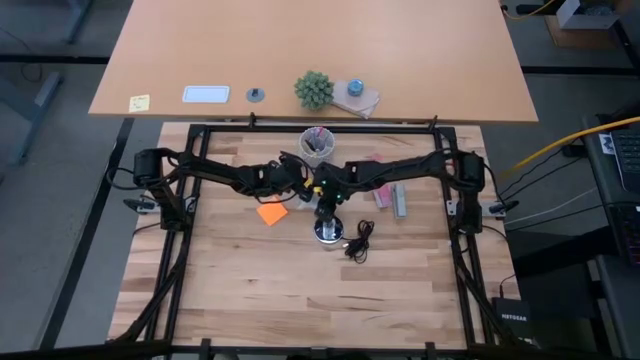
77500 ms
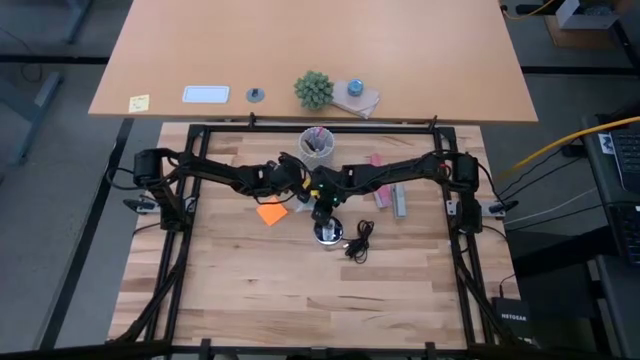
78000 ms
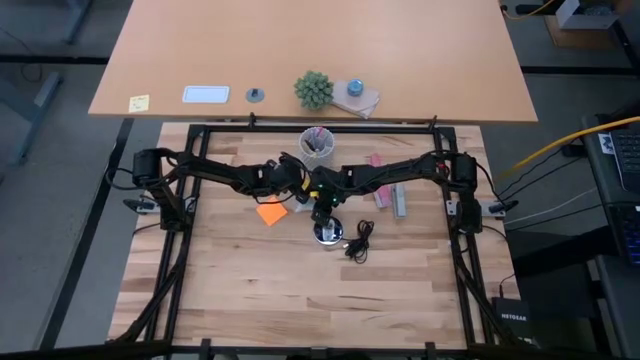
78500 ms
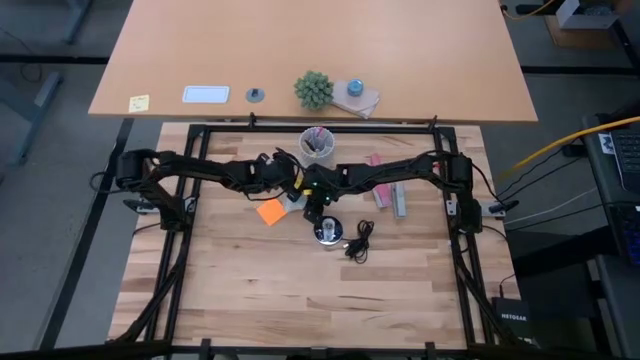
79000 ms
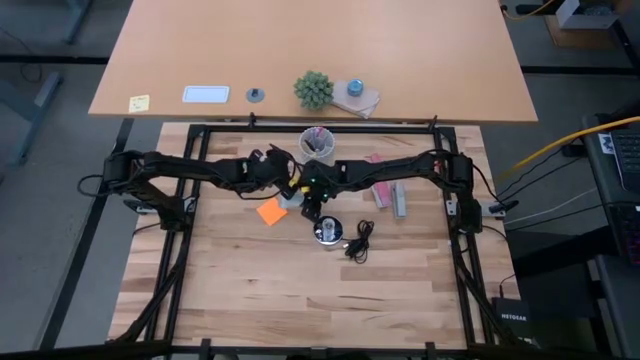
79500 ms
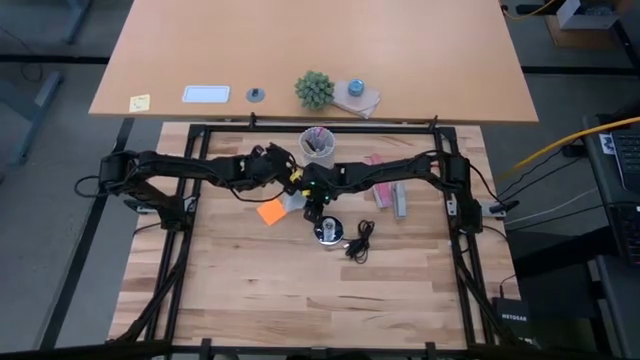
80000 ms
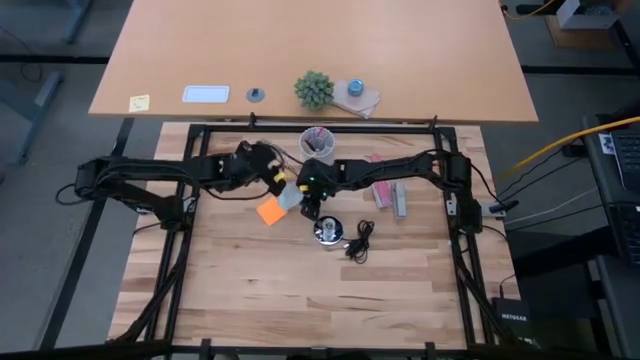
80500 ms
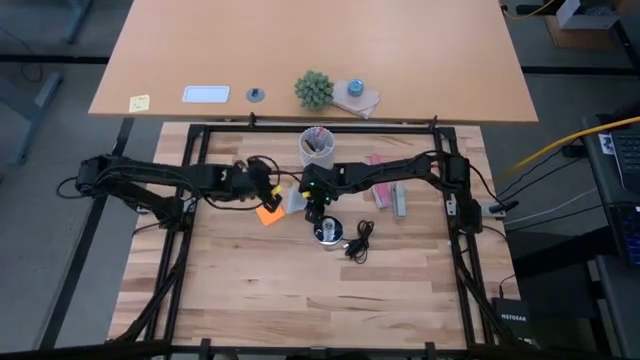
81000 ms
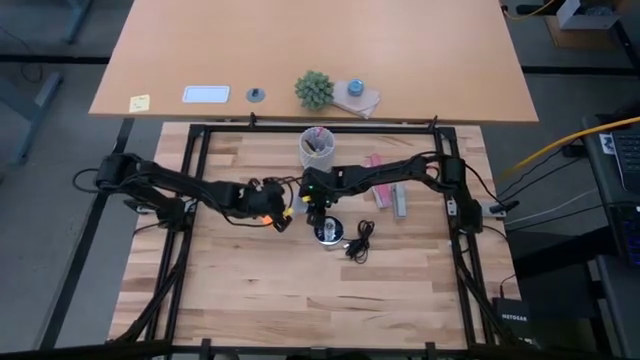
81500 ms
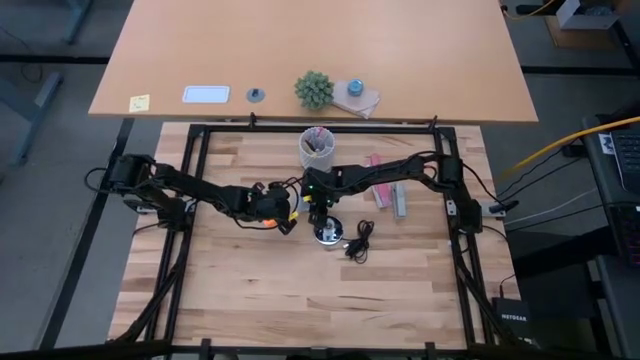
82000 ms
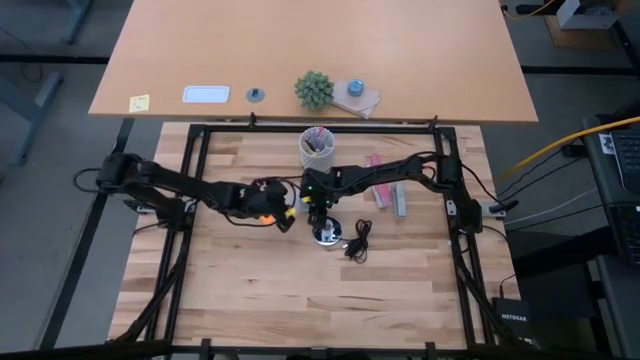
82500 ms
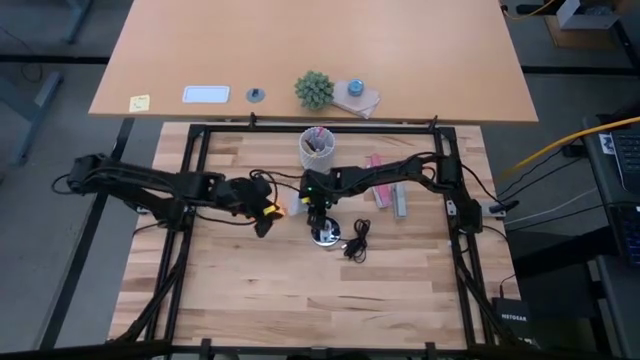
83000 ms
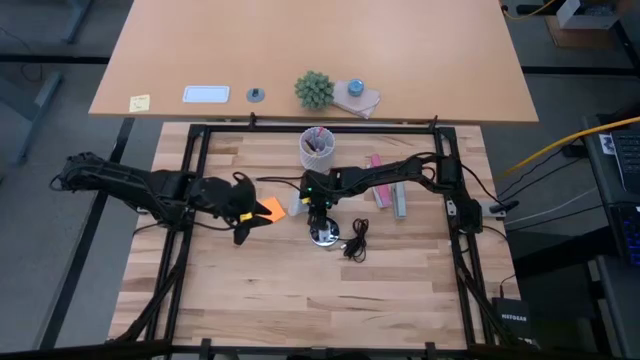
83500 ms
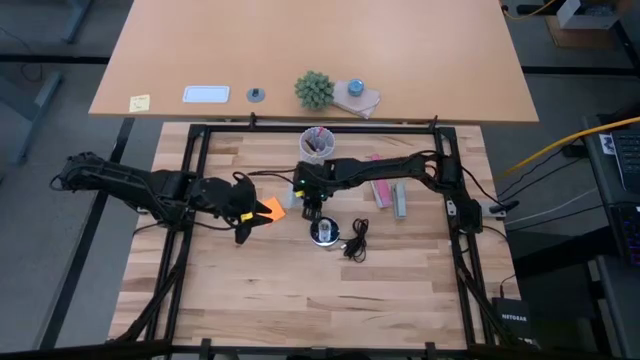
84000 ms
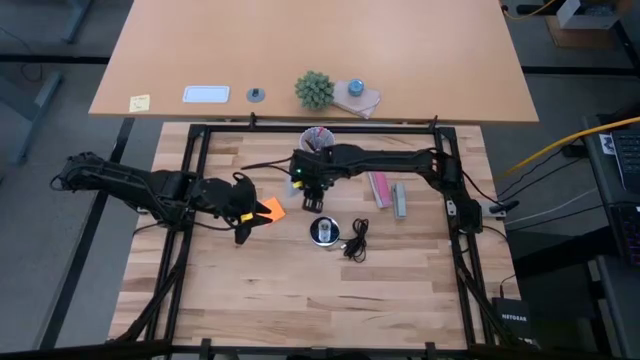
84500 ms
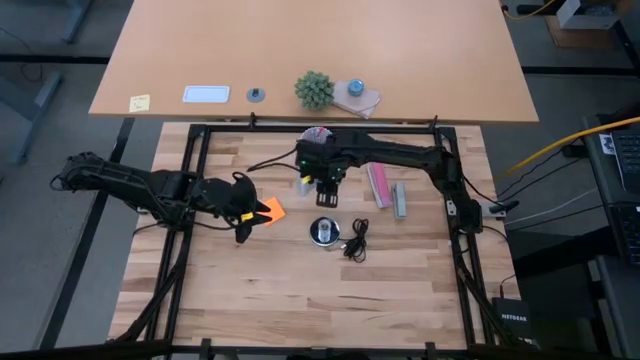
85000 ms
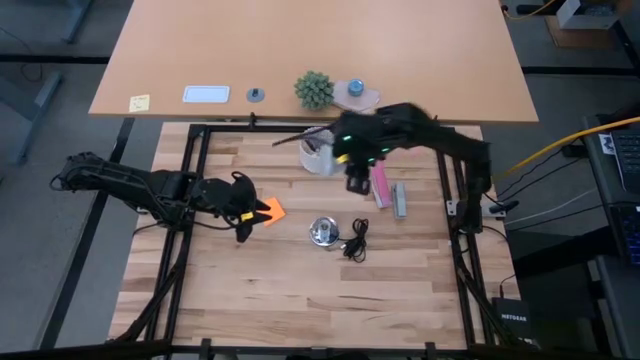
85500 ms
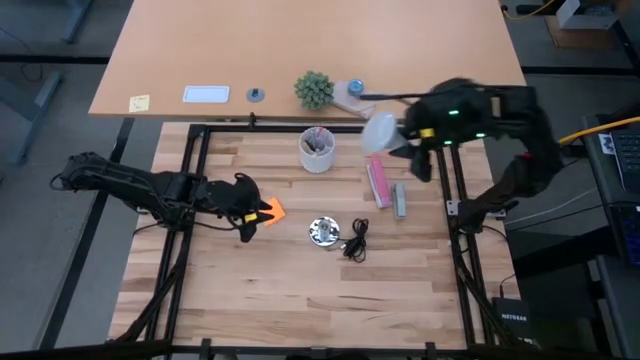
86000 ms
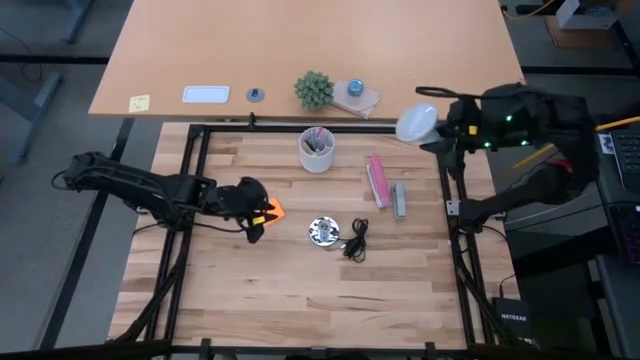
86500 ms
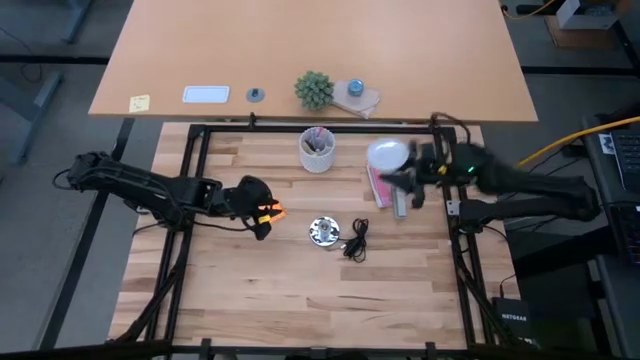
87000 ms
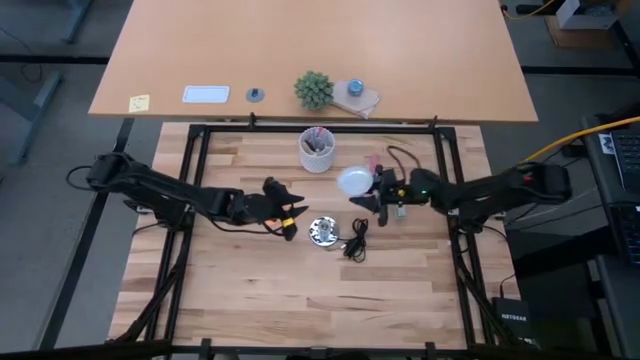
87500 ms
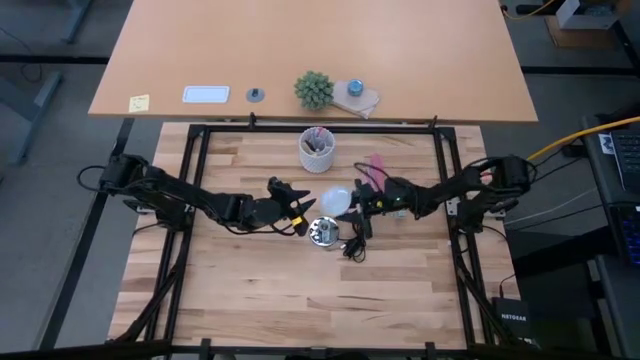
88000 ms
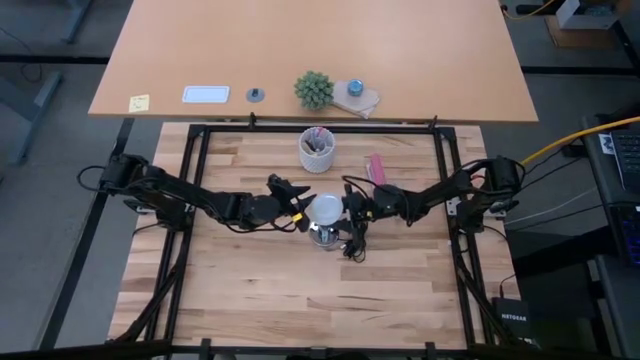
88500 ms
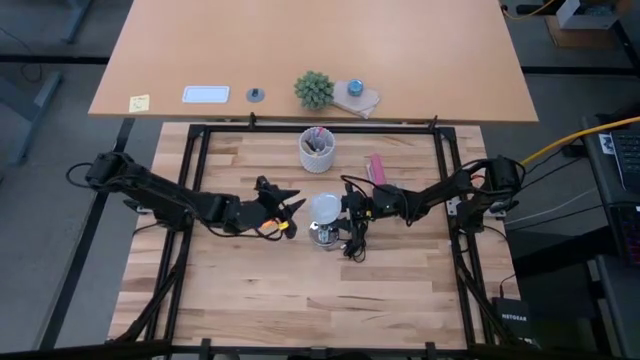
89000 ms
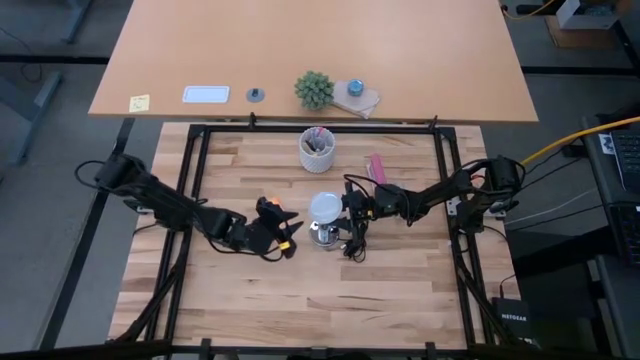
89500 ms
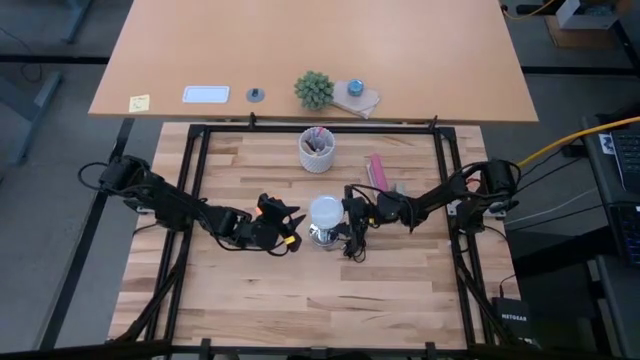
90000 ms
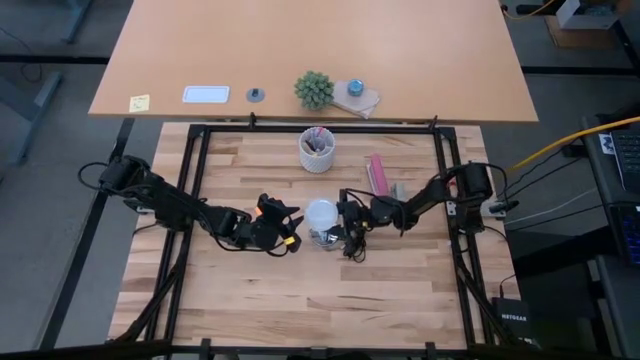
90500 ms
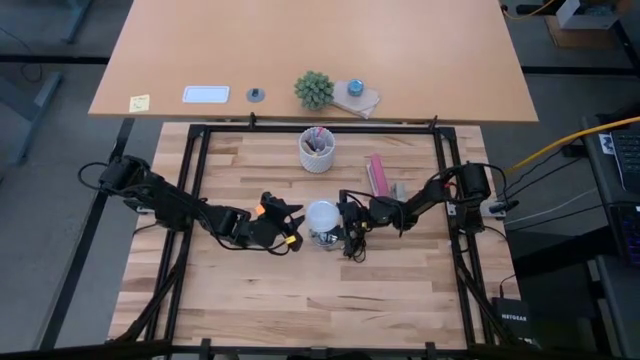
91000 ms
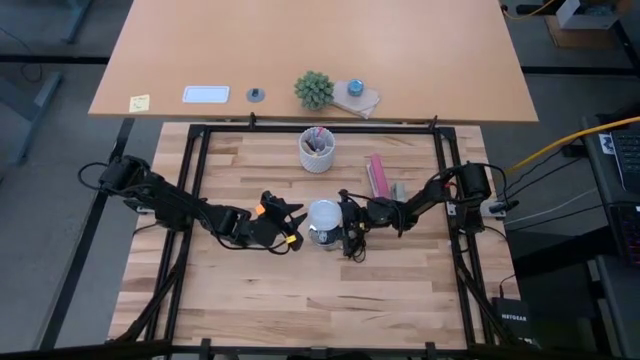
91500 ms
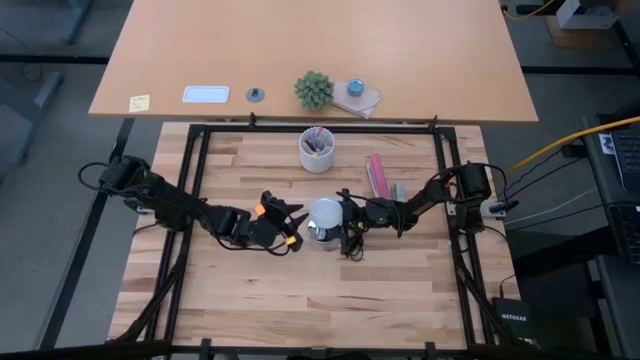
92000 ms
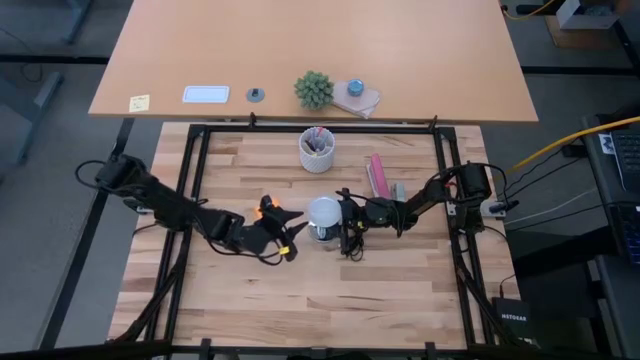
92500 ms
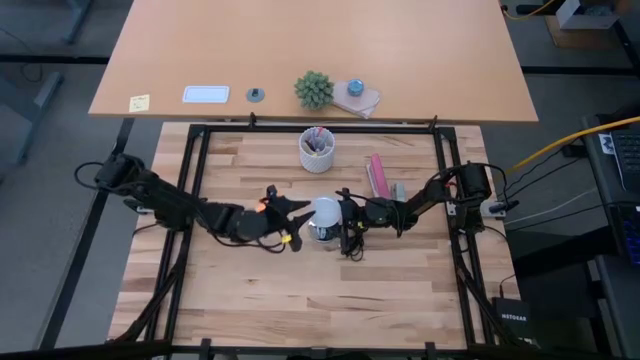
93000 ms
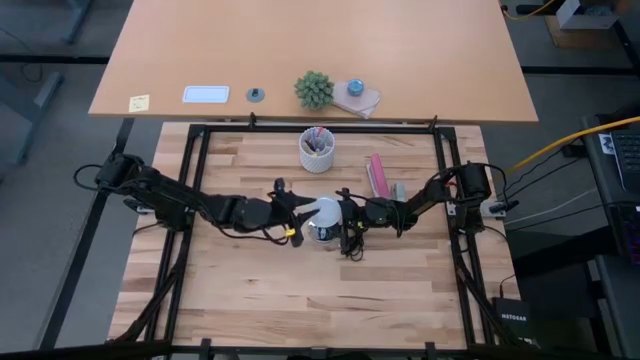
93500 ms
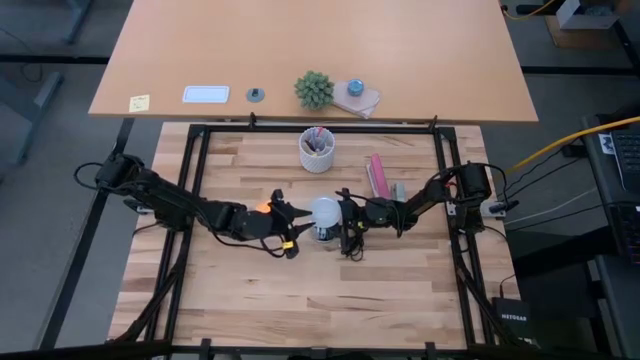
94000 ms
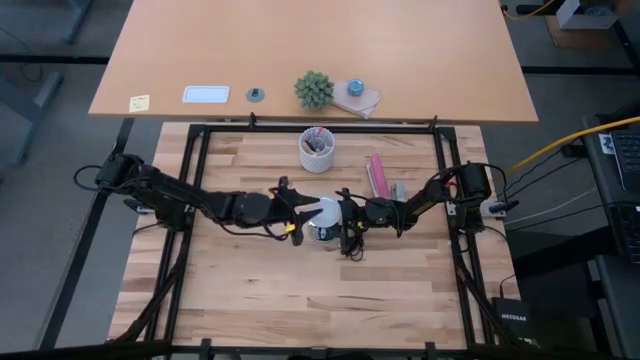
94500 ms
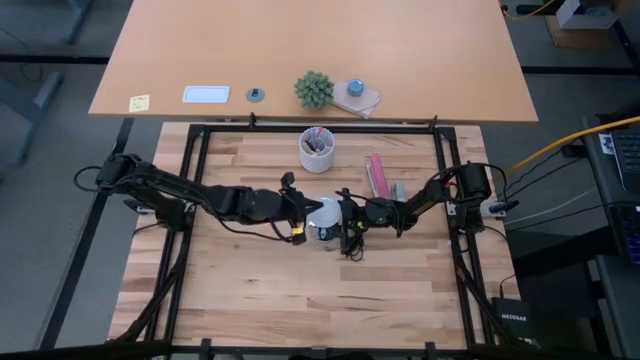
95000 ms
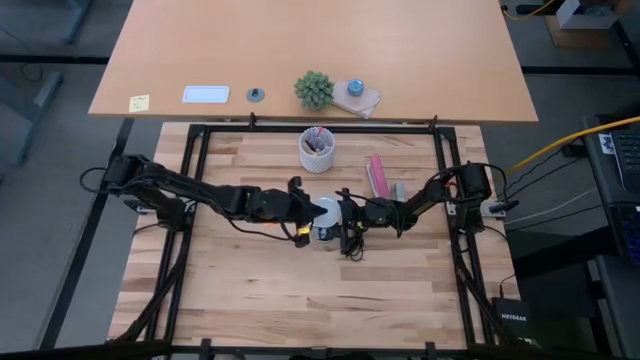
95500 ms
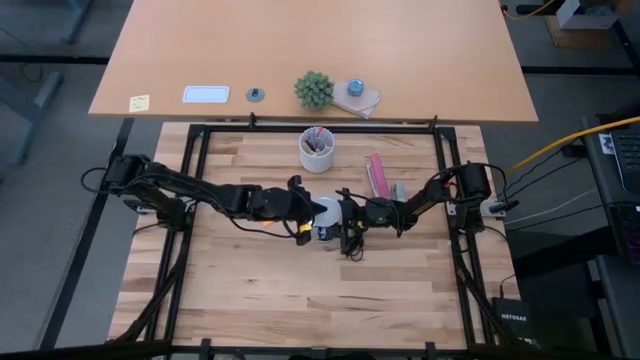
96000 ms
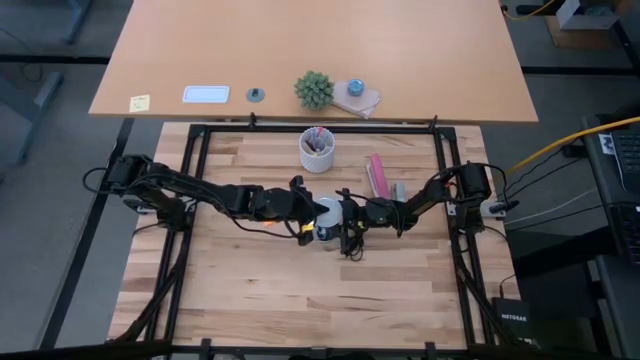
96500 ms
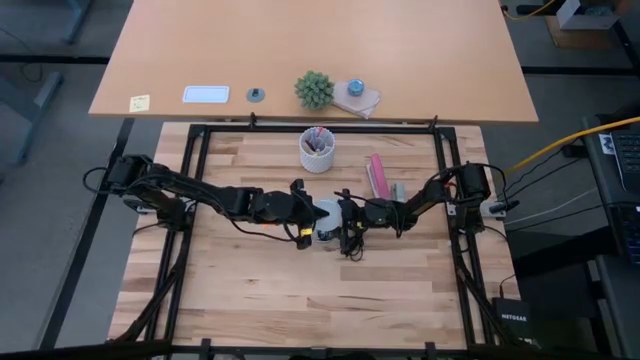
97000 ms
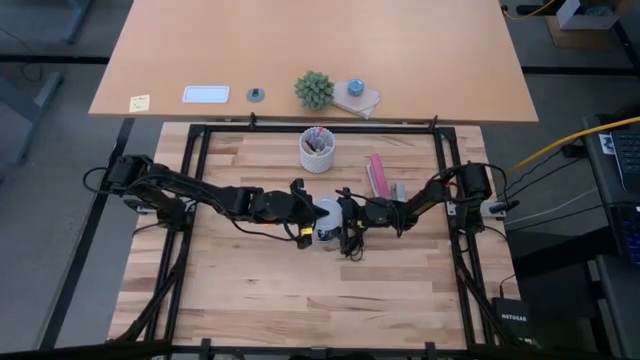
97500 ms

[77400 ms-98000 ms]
Task: Screw lightbulb
Insert the lightbulb into the lamp
